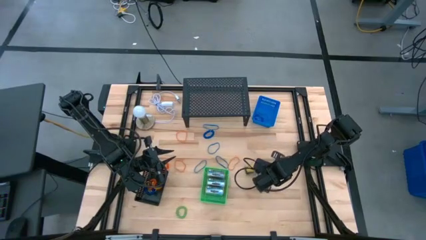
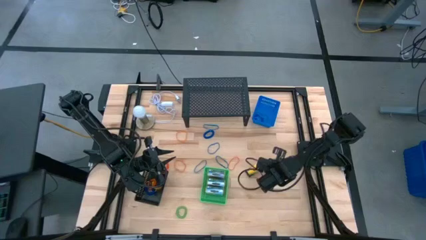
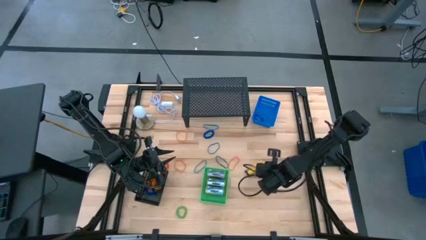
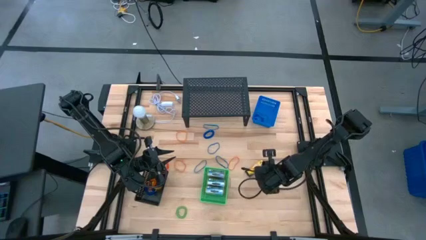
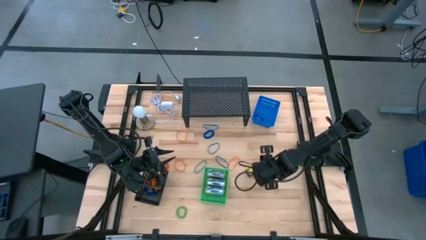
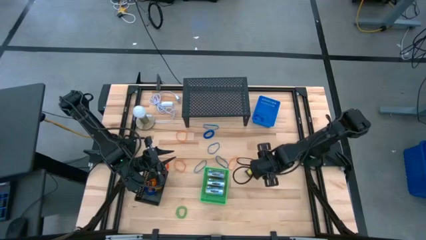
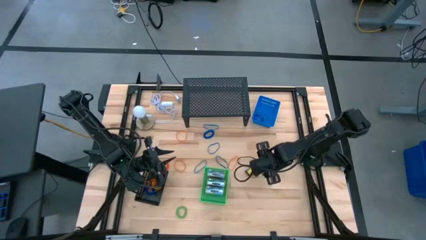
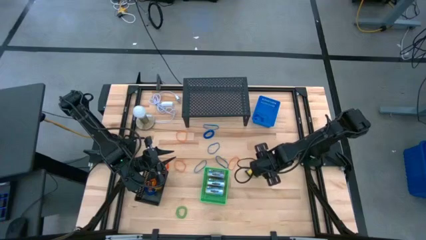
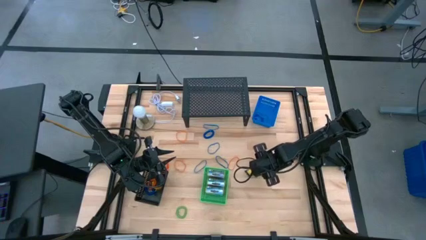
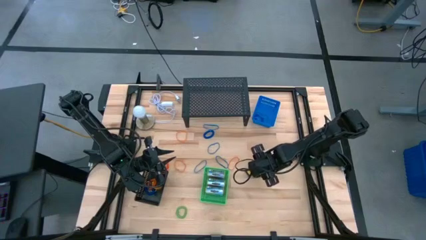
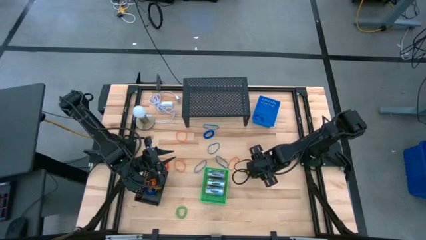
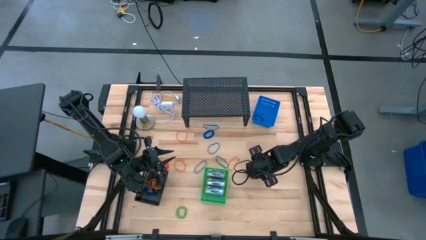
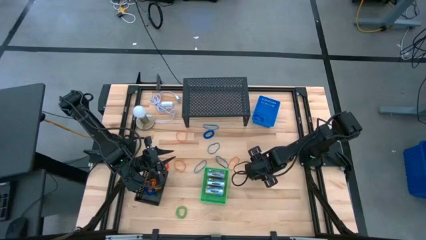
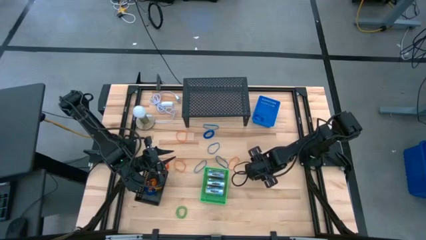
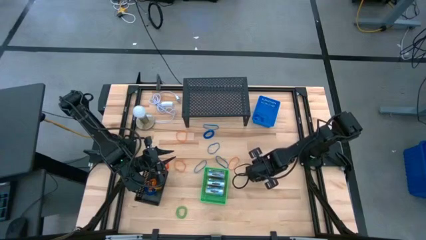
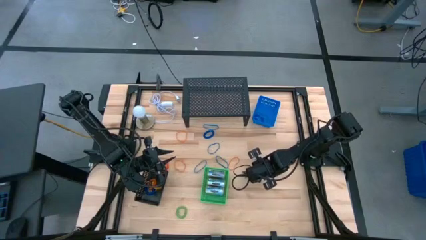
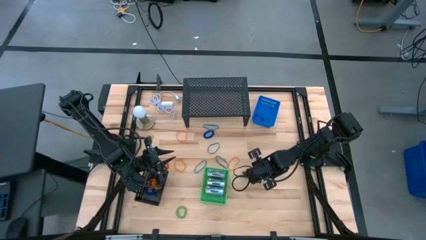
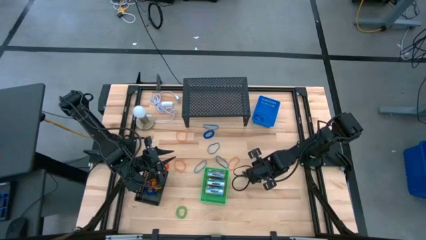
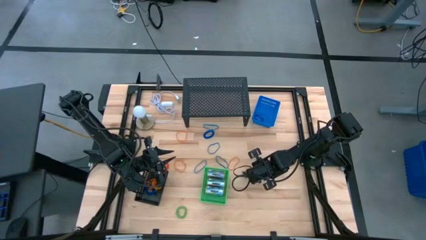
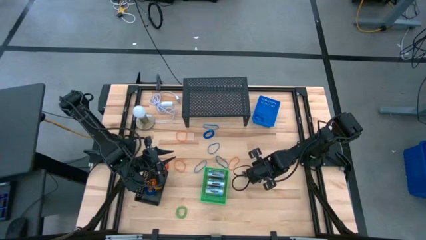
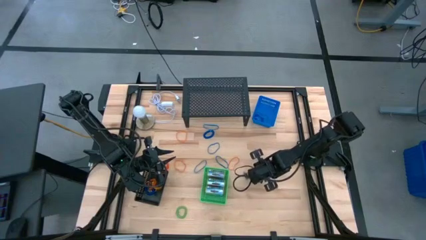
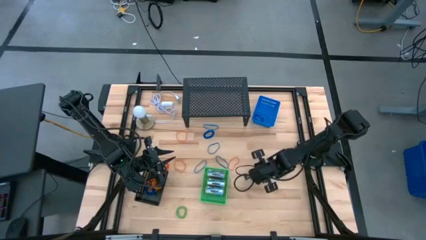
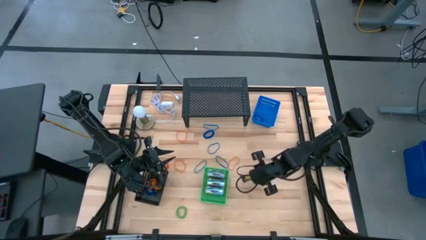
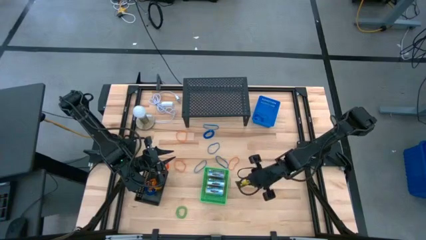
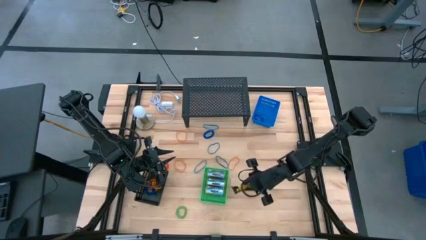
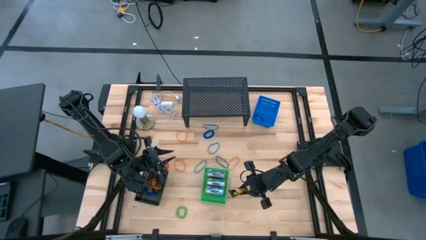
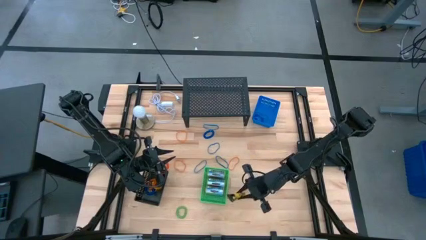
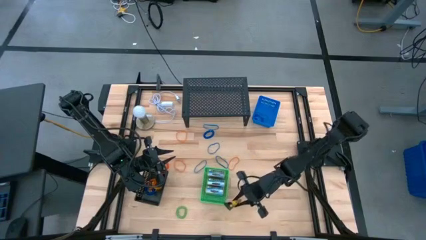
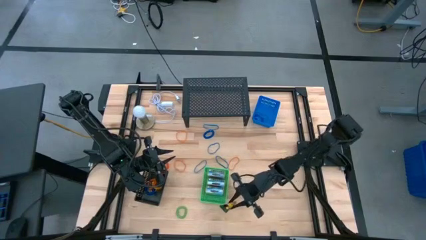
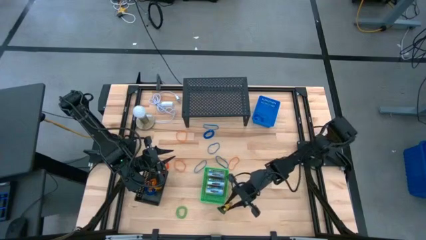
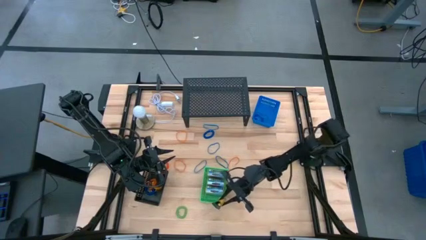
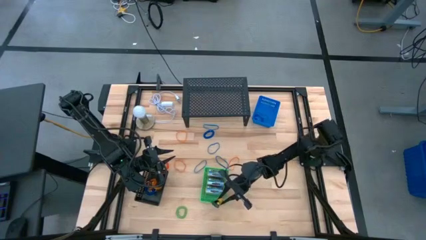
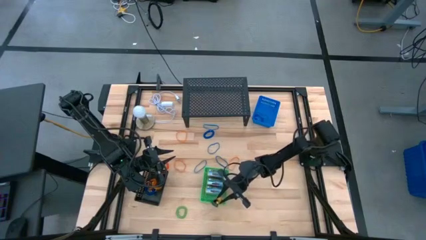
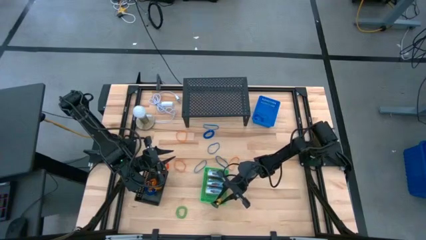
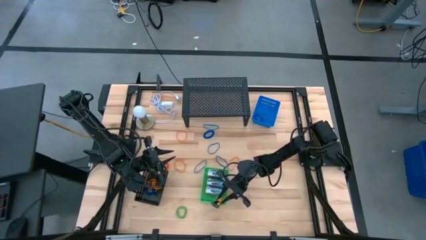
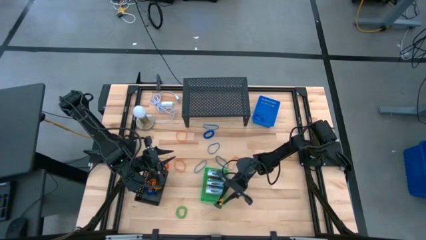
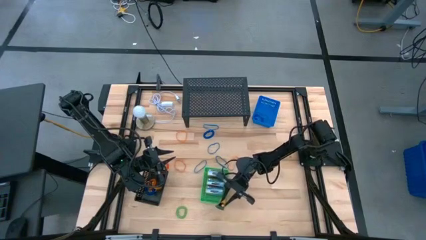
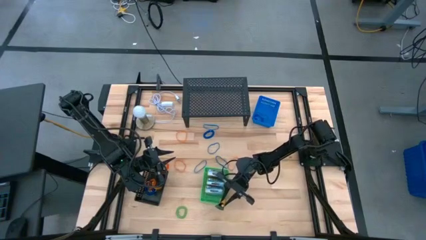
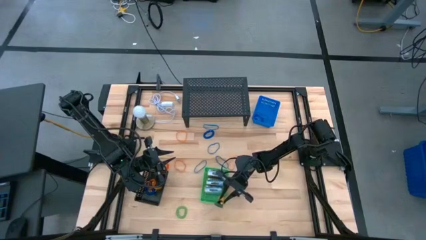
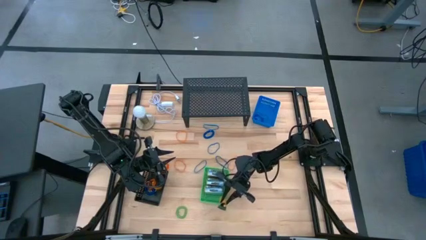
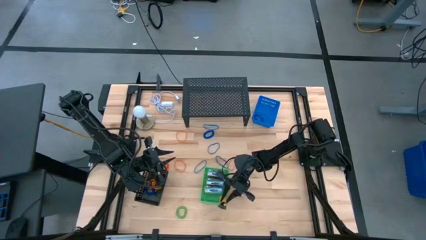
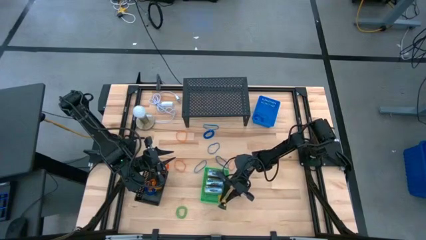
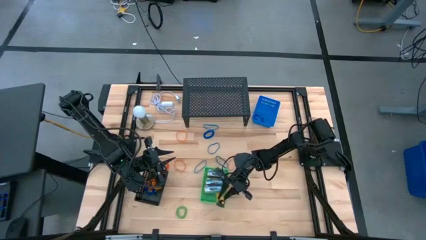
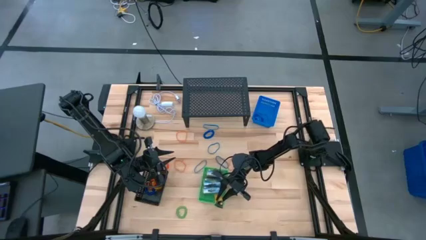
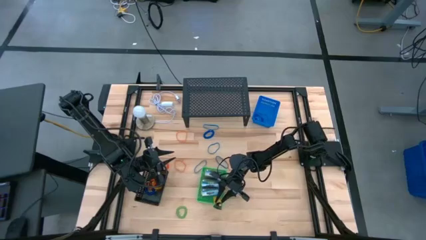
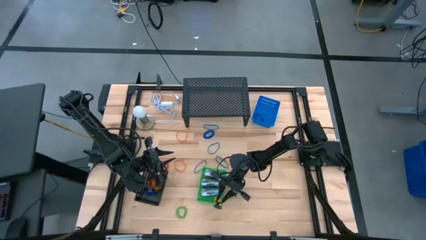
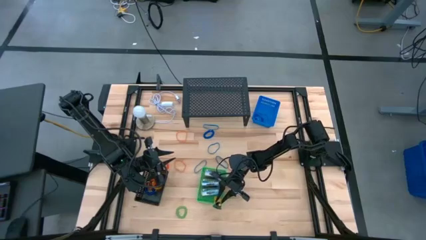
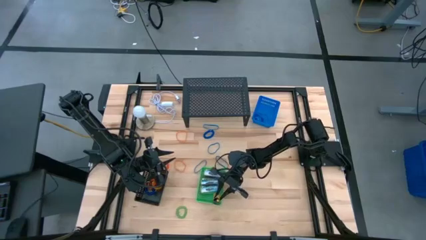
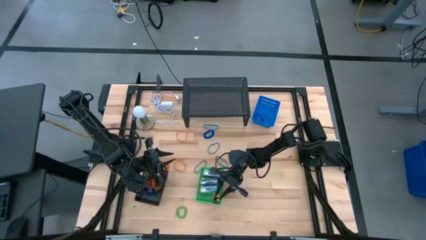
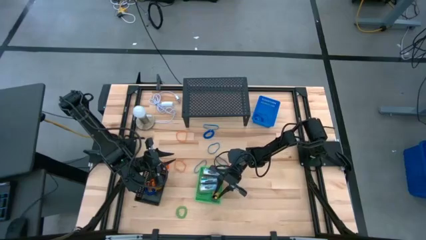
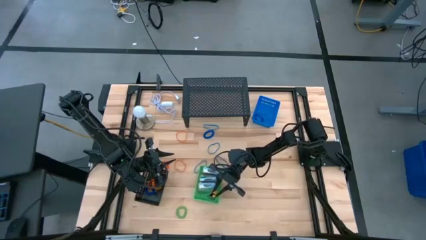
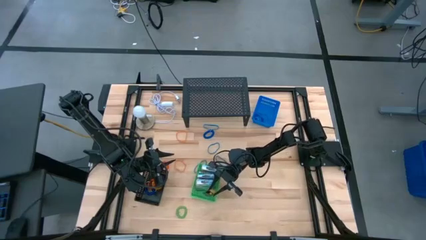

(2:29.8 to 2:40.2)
Task: Pick & Place Office Desk Supplies
Put the crayon box into the green bin
